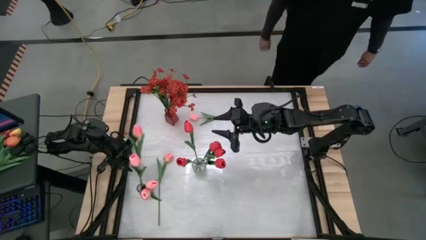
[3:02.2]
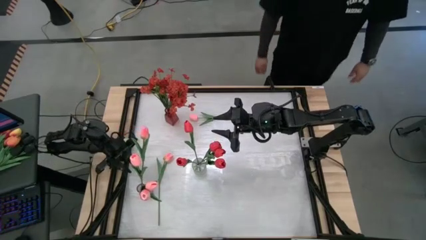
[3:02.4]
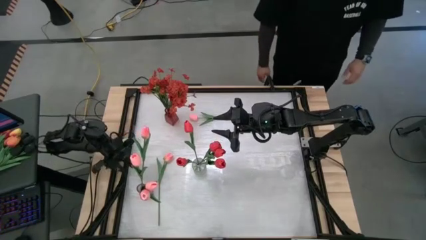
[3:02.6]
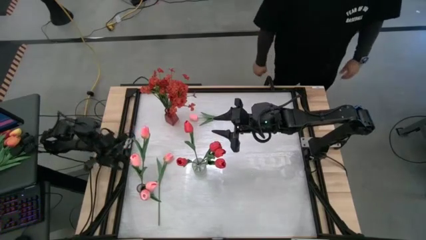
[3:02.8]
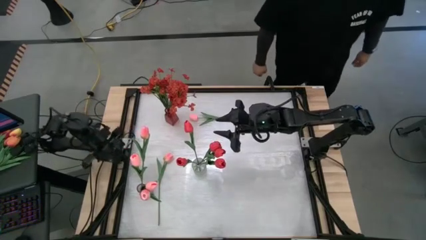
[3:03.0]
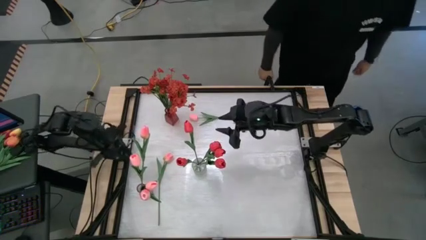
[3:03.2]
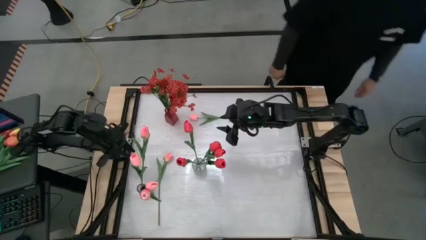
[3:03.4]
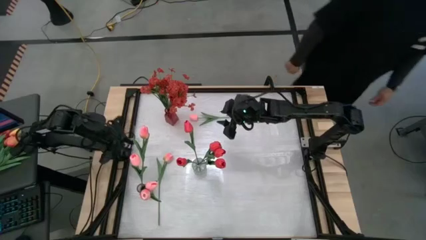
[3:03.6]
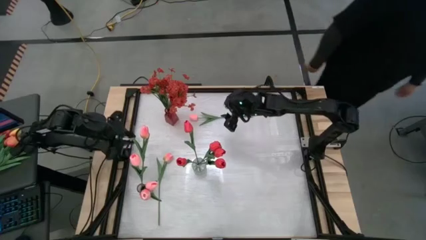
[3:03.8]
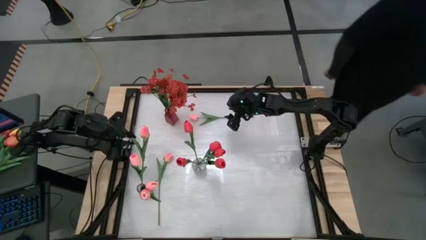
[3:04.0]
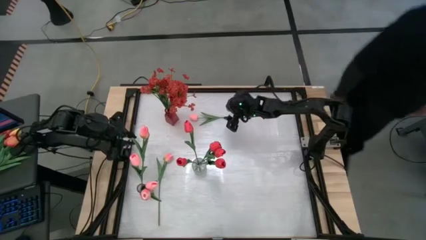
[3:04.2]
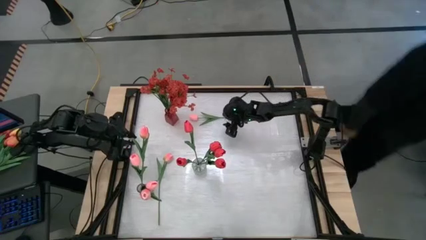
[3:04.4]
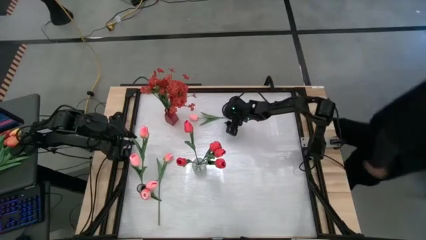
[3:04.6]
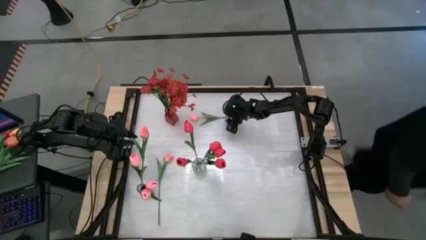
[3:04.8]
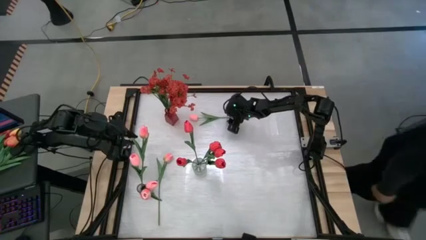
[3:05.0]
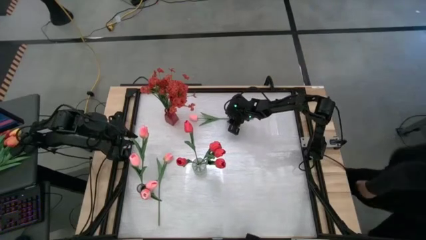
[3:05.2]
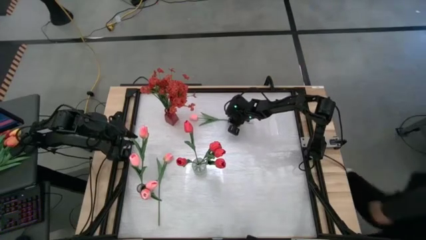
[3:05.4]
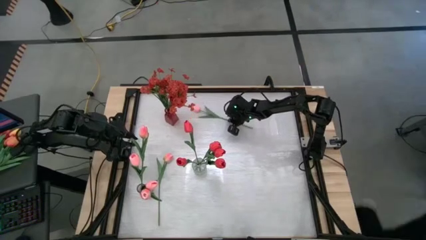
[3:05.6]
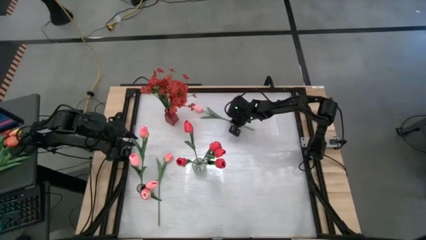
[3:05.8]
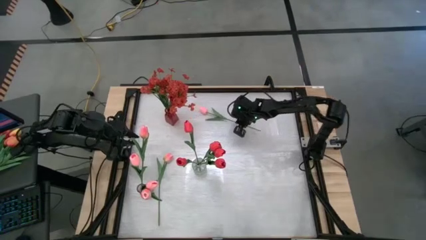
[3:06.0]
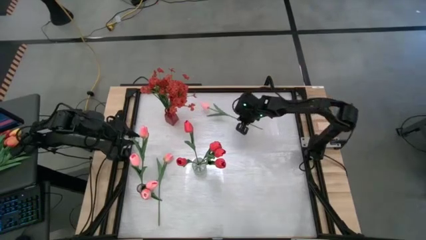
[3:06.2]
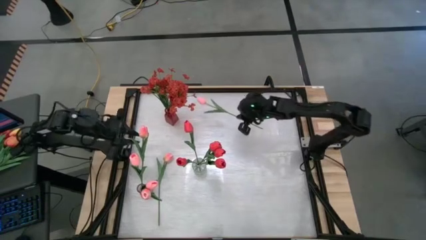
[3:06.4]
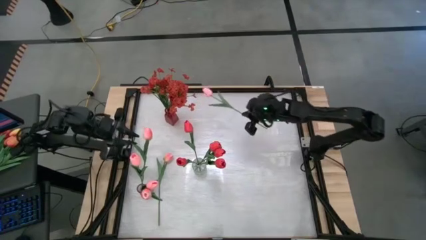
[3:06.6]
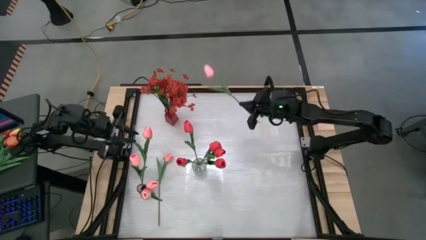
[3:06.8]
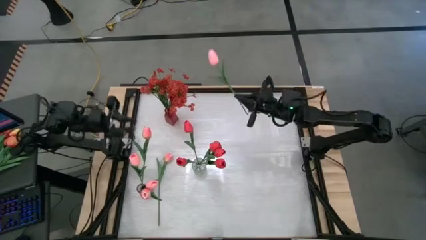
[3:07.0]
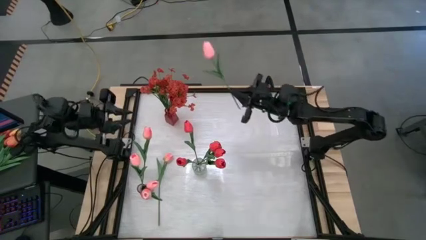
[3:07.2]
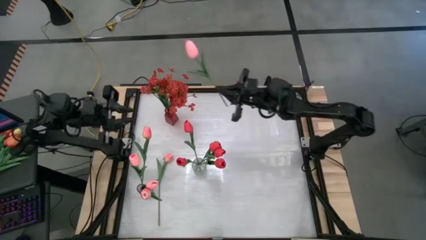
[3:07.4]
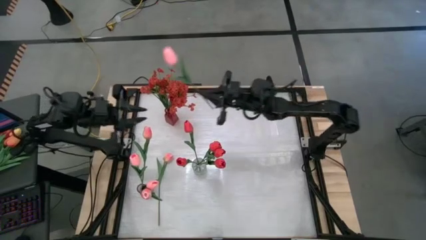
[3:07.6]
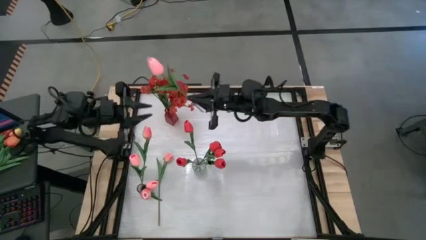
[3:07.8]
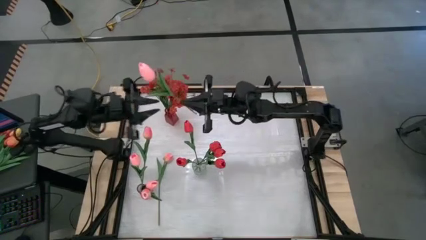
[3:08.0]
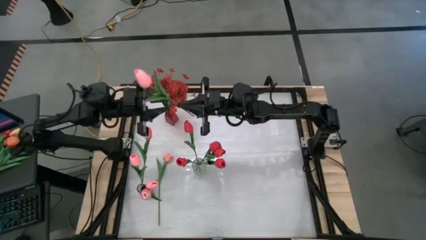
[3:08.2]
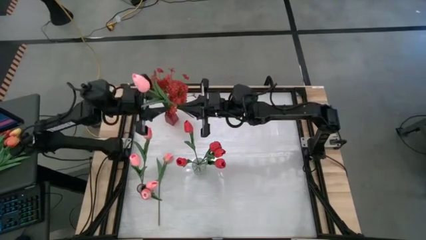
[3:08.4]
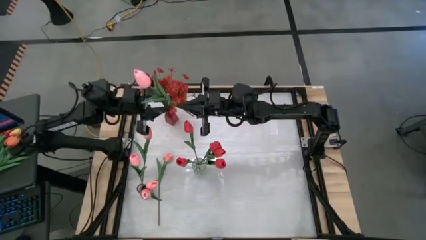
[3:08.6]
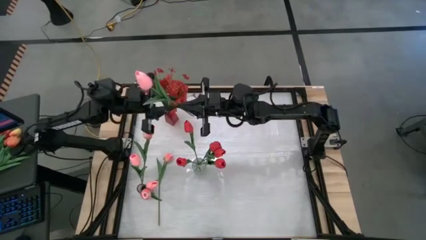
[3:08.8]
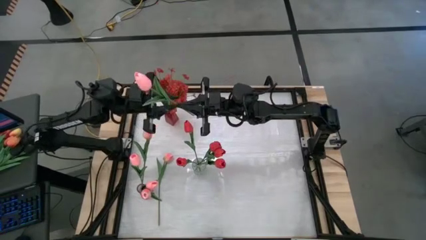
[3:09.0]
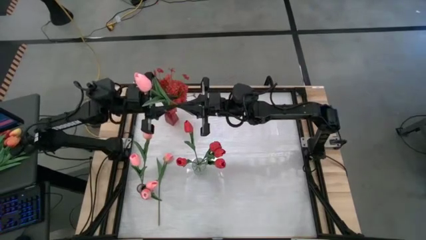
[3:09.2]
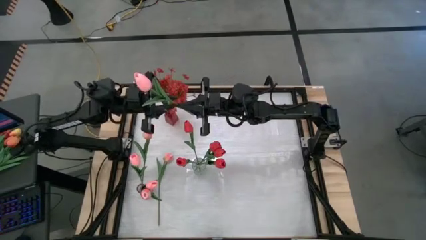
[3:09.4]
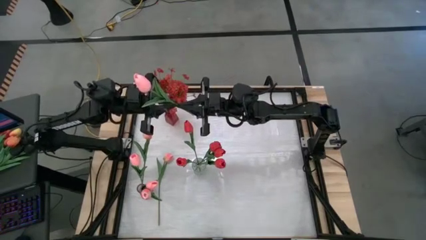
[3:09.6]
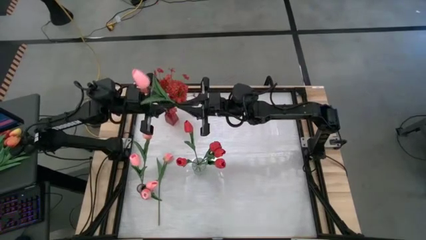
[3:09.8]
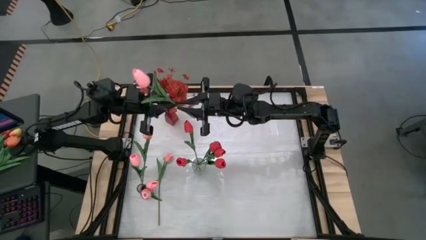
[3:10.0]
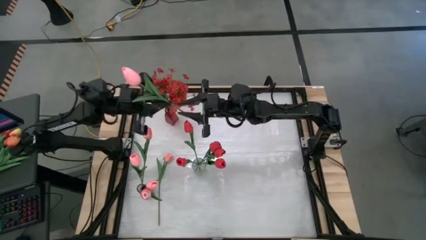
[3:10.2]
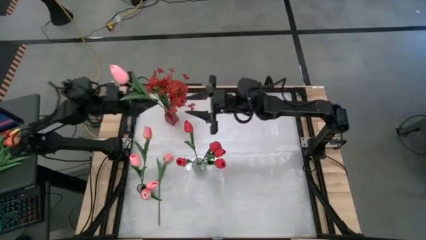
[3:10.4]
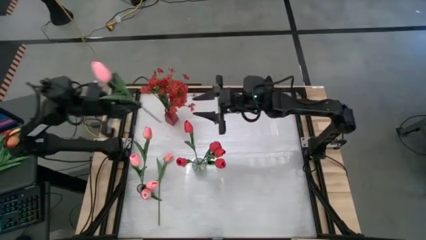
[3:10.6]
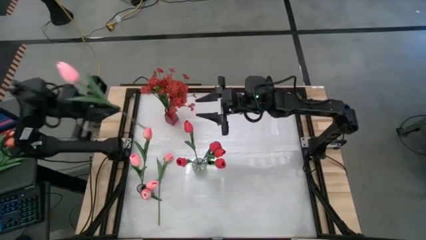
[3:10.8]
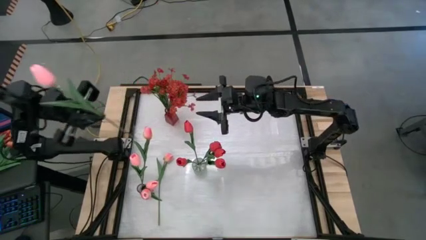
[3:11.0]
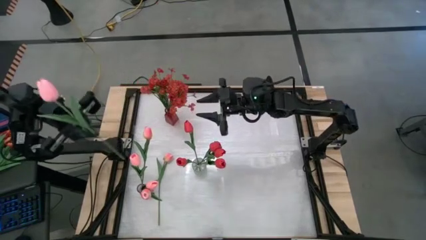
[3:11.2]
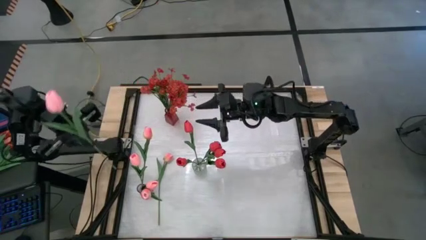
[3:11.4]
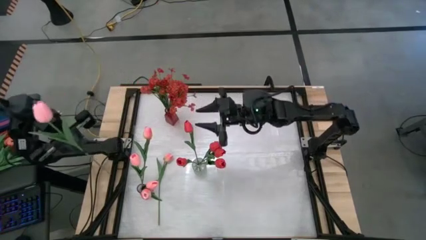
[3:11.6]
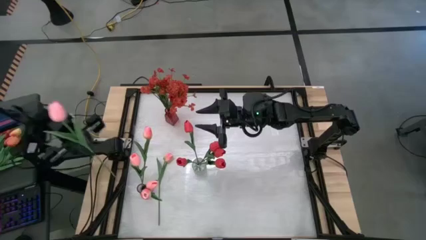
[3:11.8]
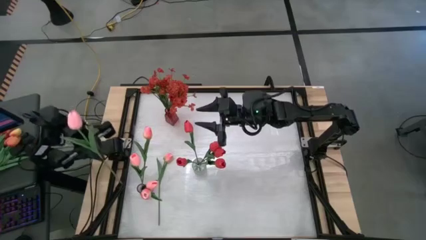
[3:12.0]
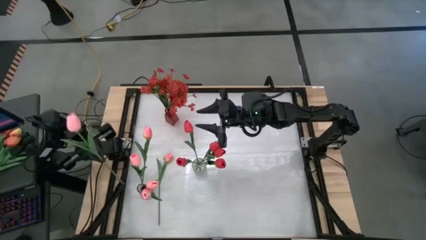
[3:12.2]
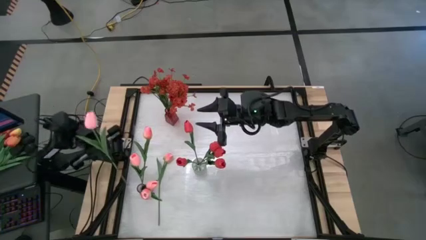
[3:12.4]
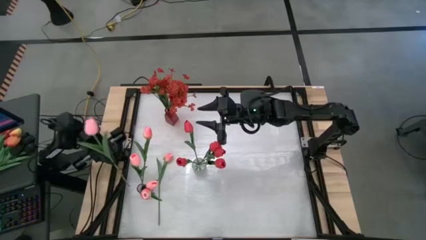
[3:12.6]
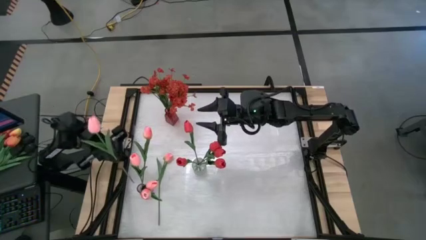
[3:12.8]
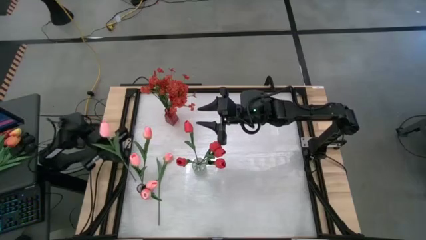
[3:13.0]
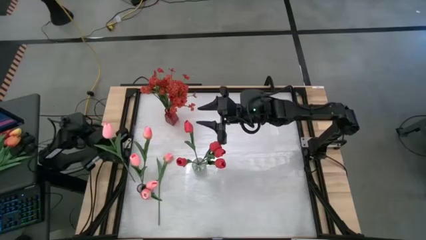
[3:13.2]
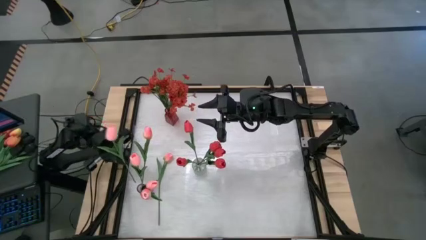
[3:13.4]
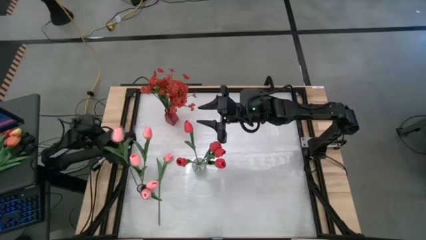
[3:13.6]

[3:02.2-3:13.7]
Task: Sort flowers into vase by color
Put the pink flower into the purple vase
